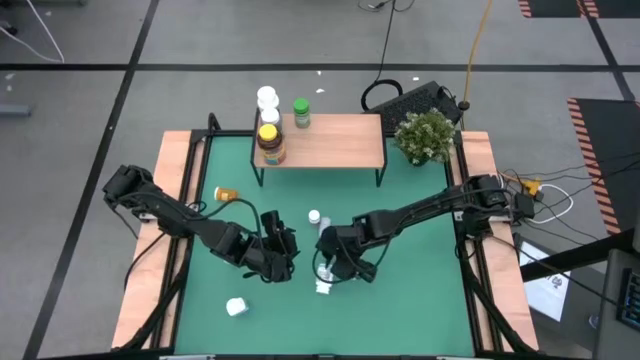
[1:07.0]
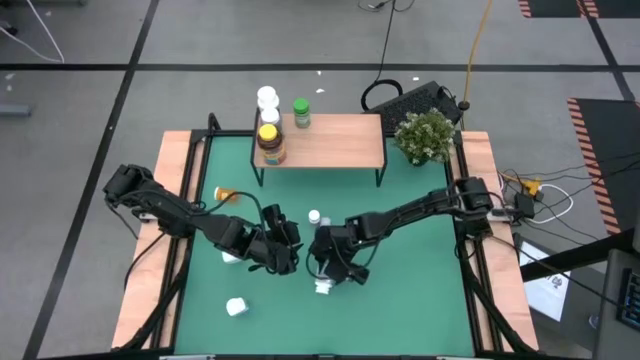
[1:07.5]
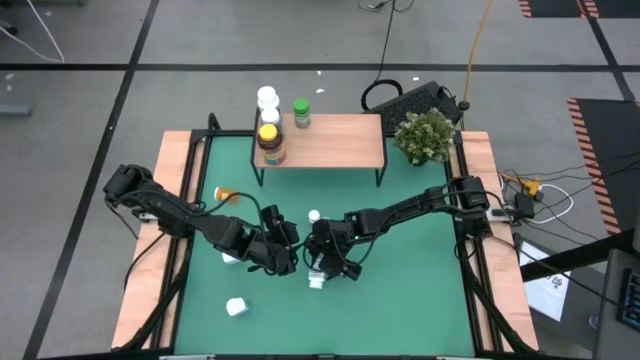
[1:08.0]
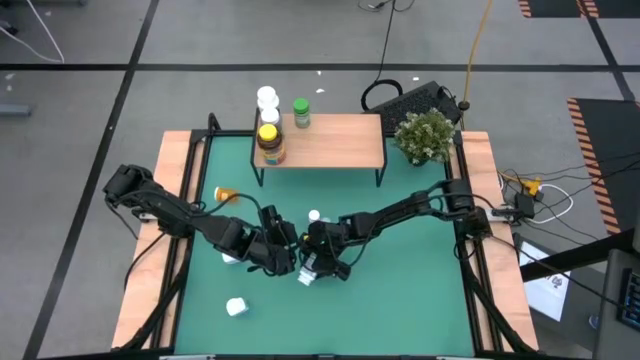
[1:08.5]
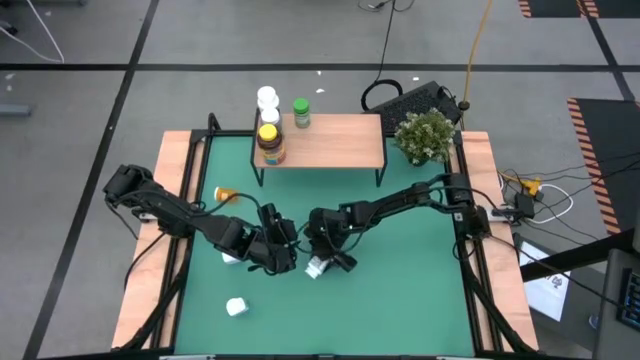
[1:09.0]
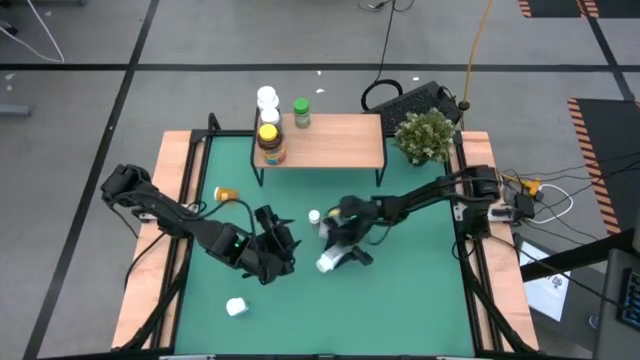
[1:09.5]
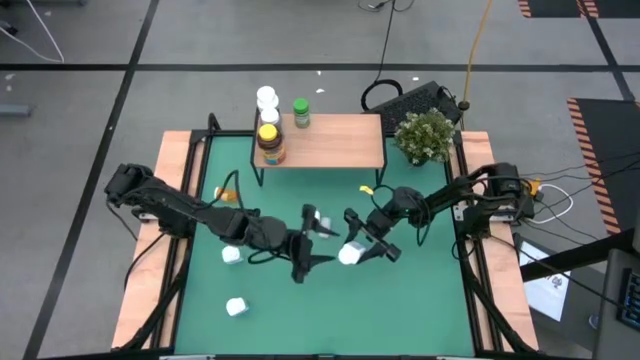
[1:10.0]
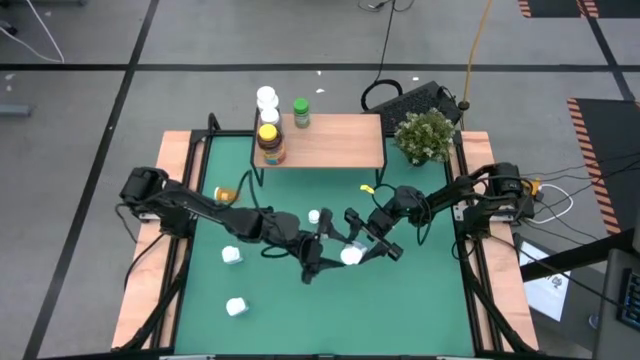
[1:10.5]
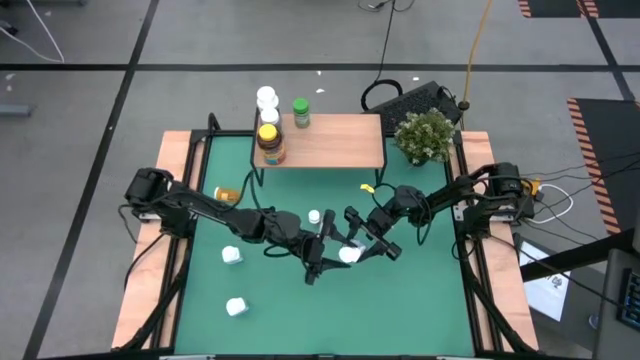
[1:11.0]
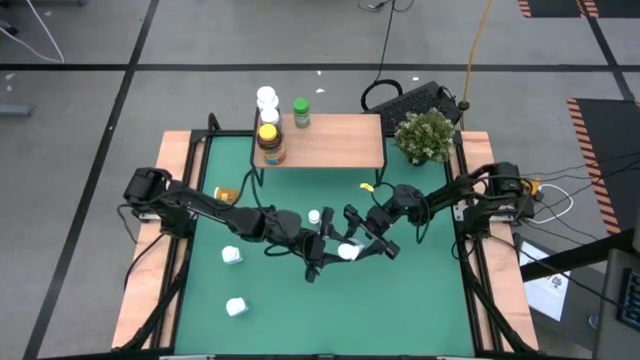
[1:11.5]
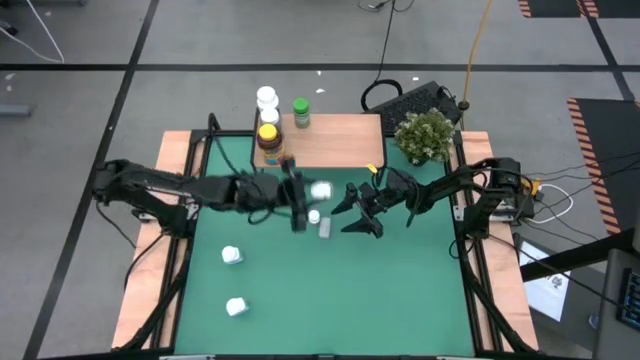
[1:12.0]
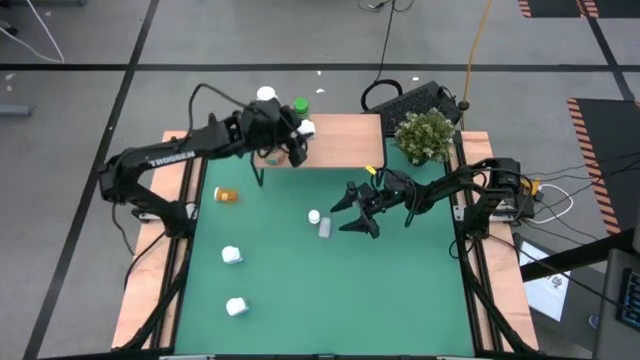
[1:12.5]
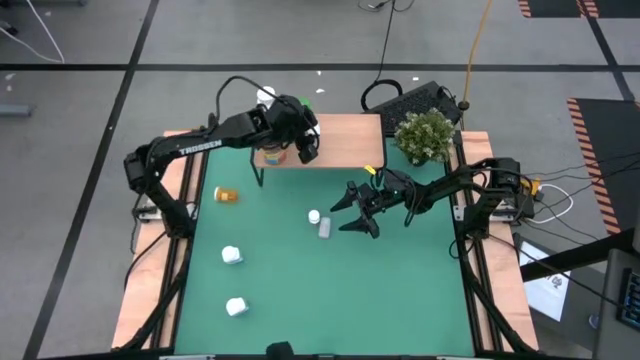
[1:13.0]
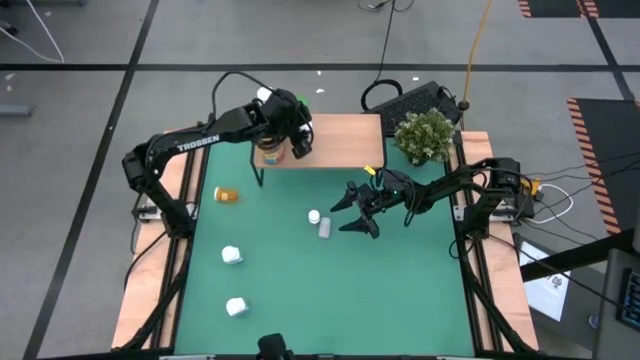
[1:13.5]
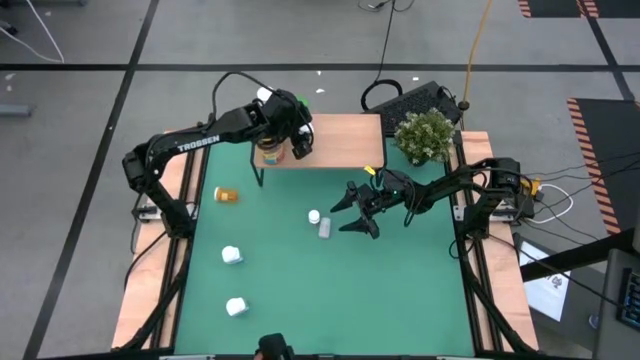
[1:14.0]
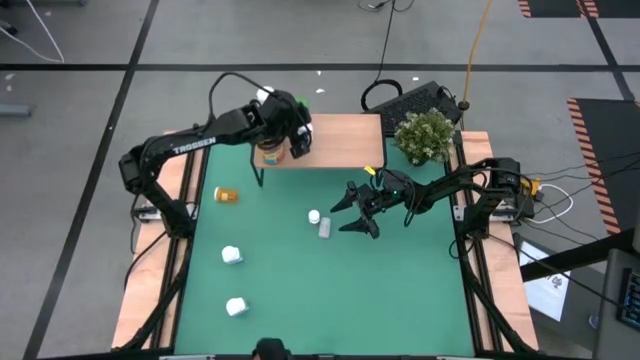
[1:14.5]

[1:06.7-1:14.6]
Task: Pick and place medicine bottles onto shelf by color
Put the right white and blue pill bottle on the shelf

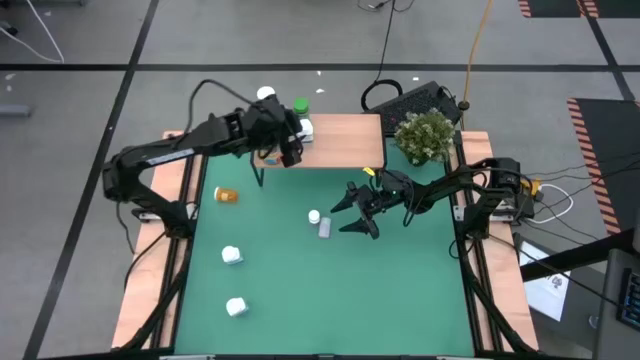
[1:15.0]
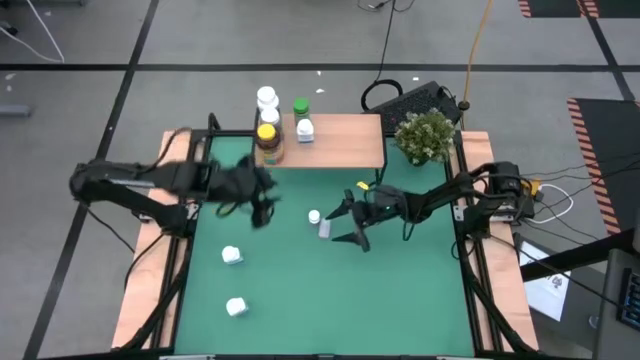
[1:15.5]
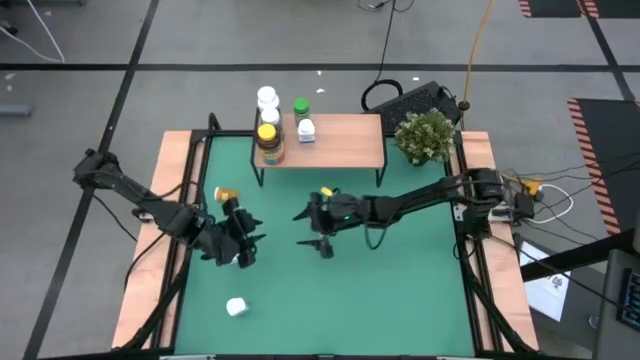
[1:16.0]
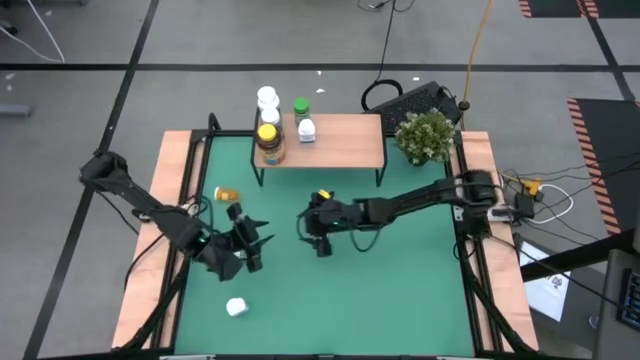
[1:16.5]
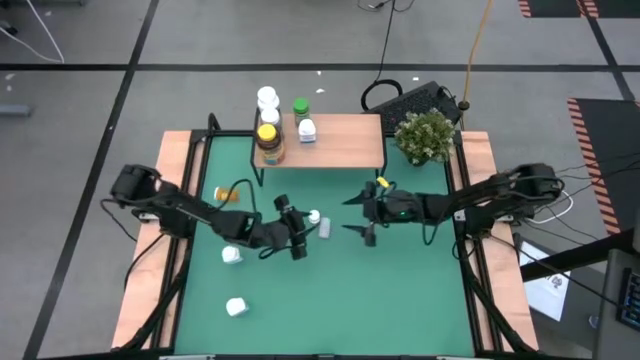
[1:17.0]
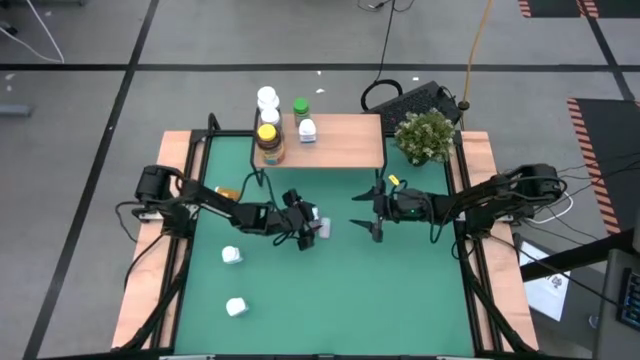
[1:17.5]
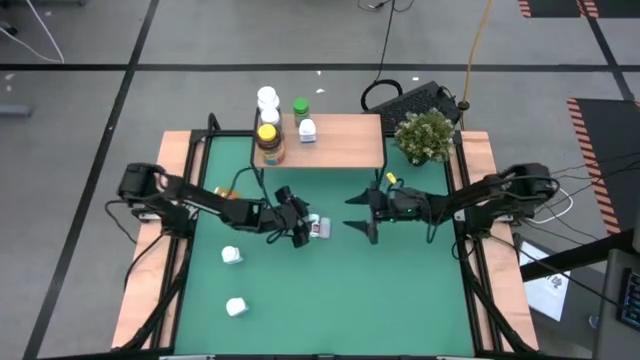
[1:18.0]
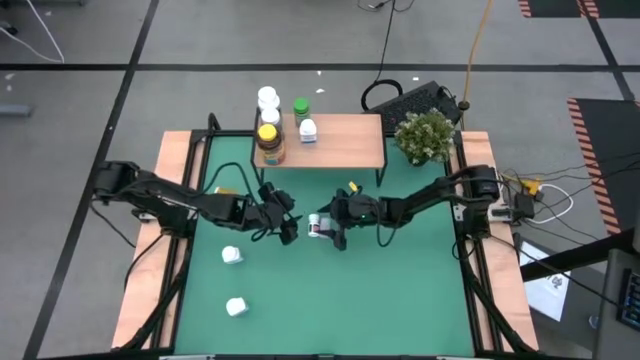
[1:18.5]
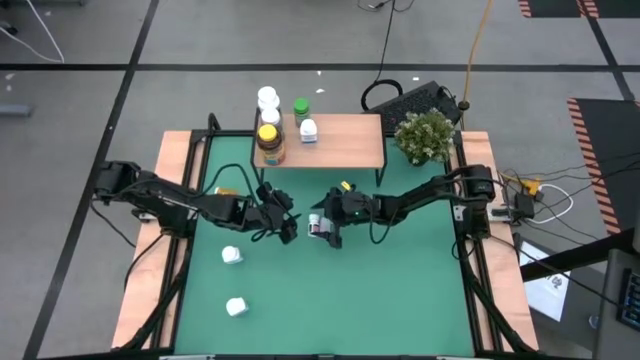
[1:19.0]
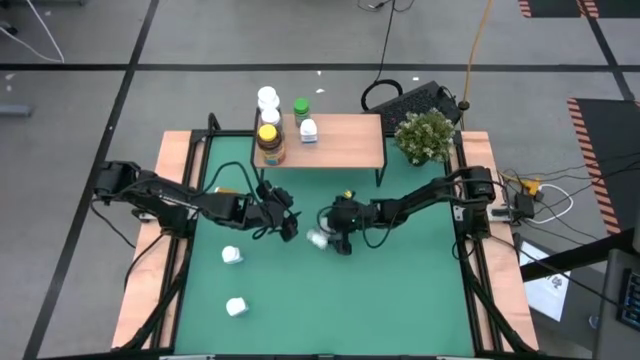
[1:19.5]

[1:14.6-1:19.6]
Put the white and black pill bottle on the shelf

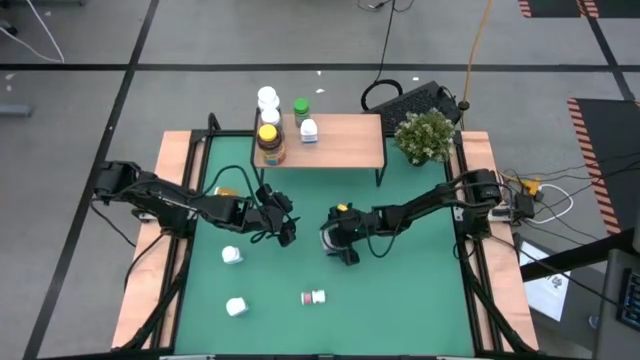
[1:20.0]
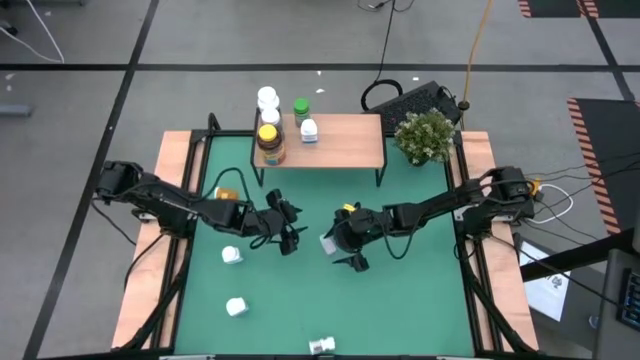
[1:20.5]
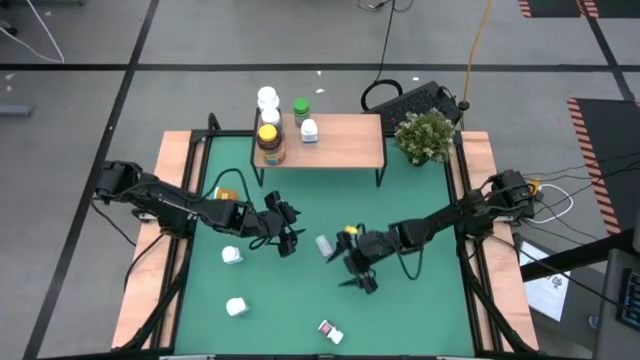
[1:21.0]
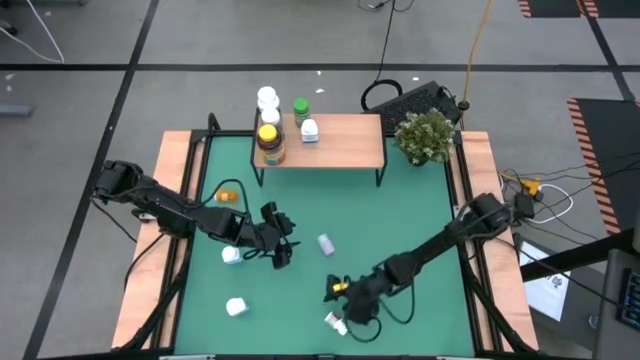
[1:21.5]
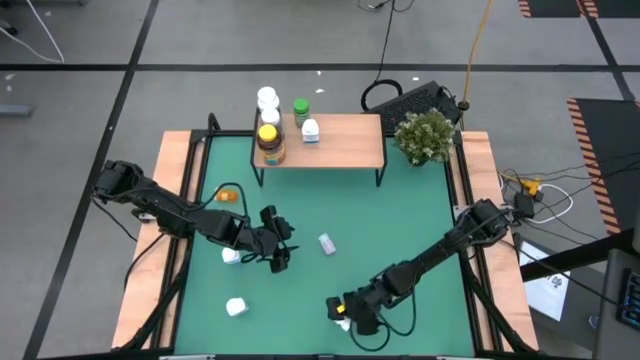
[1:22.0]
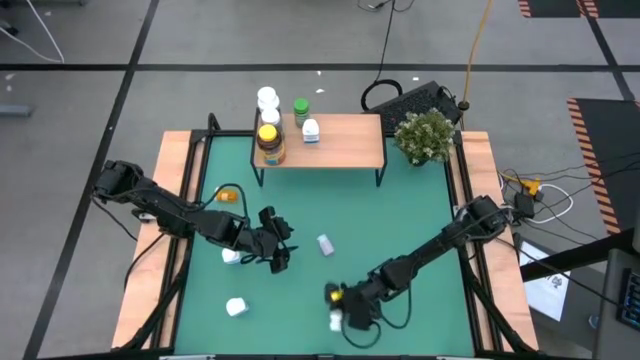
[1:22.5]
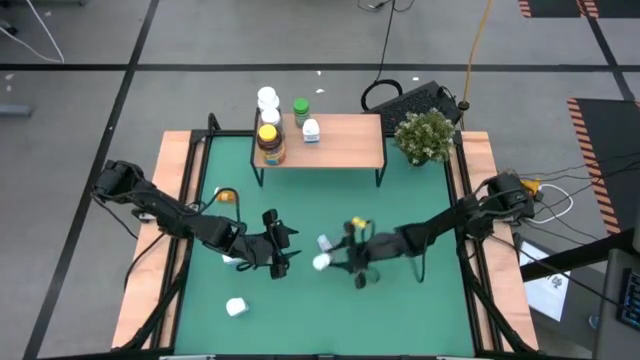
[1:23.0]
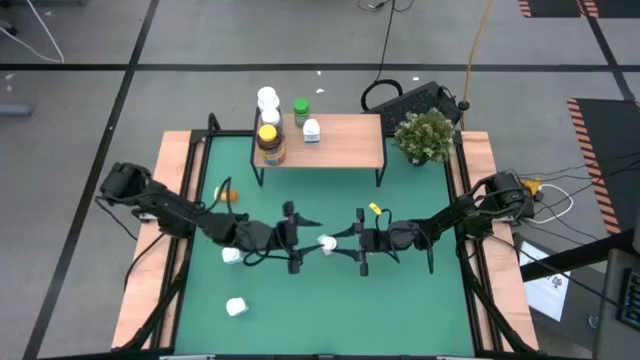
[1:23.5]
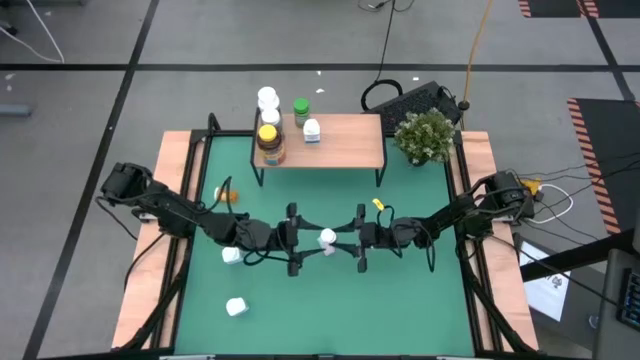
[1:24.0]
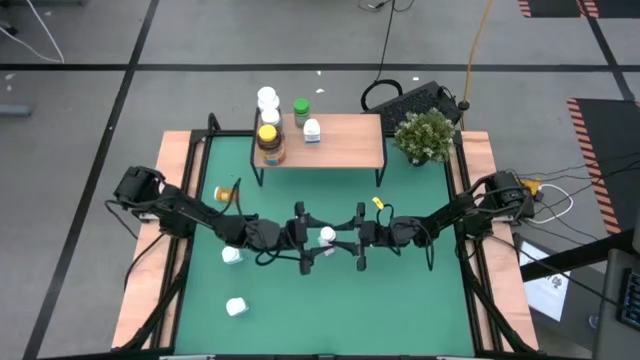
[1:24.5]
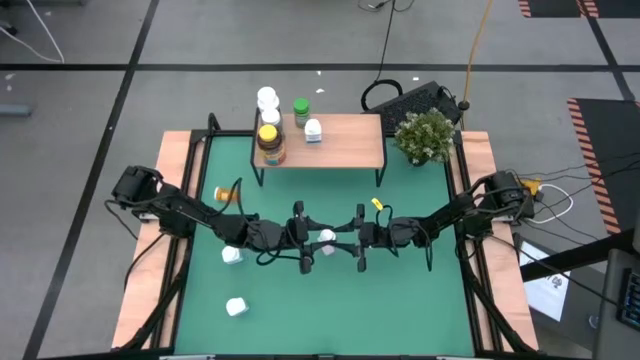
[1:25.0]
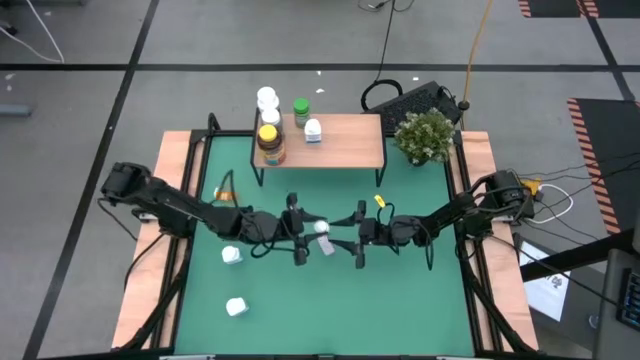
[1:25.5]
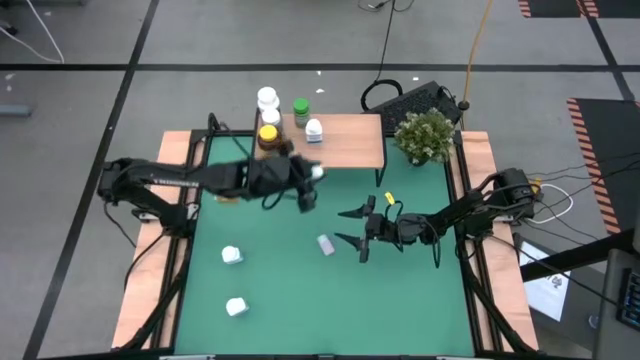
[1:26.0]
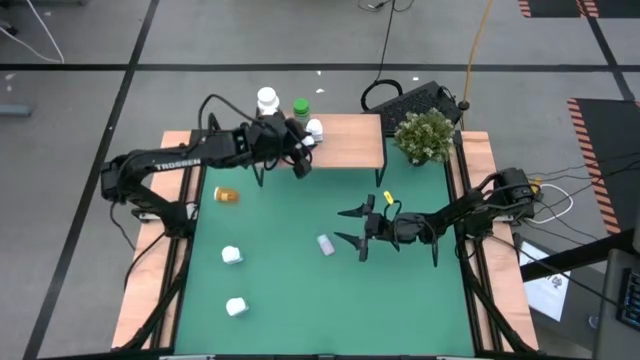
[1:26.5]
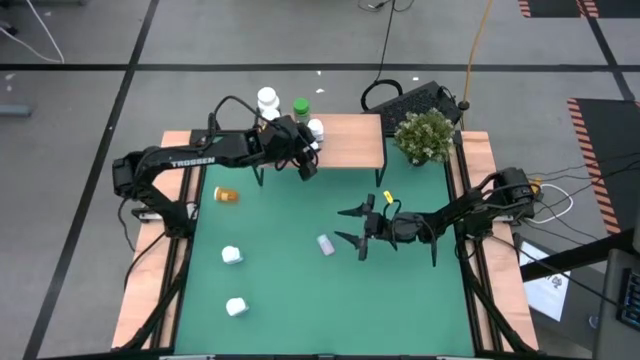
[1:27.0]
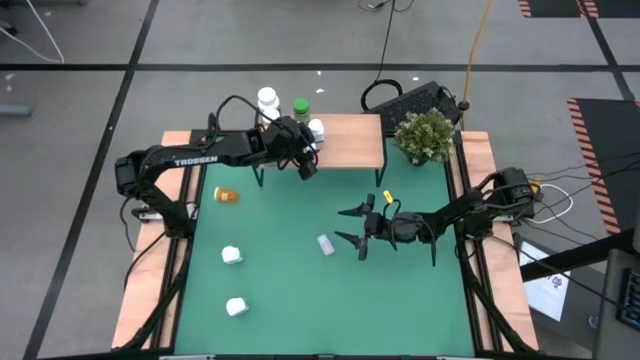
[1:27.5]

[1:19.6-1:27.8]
Put the white and black pill bottle on the shelf

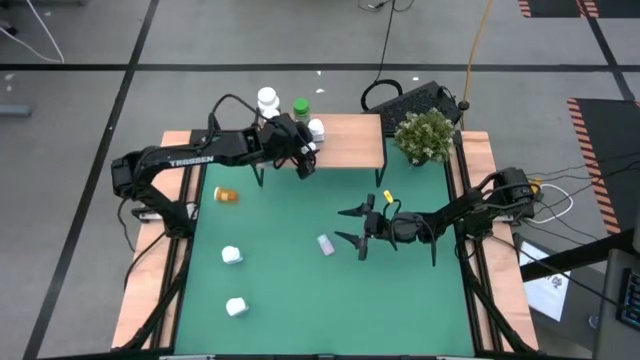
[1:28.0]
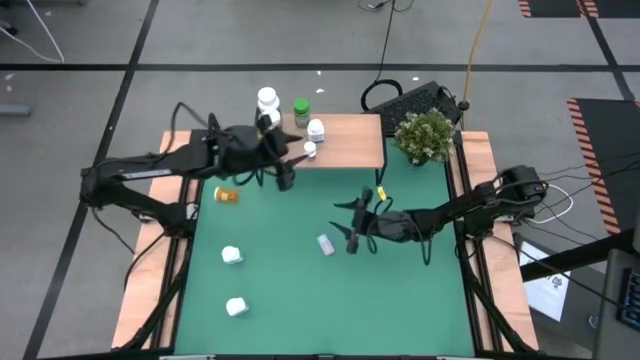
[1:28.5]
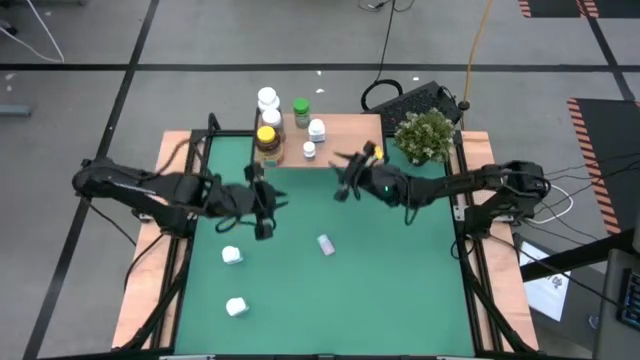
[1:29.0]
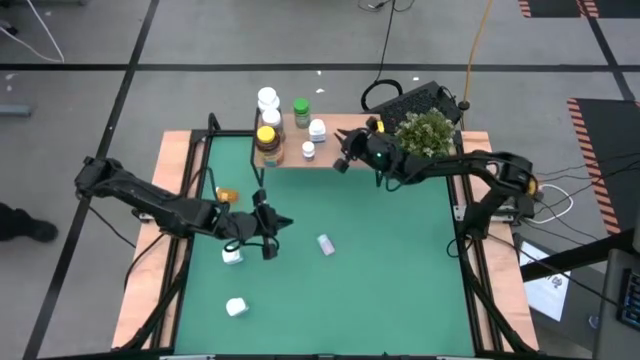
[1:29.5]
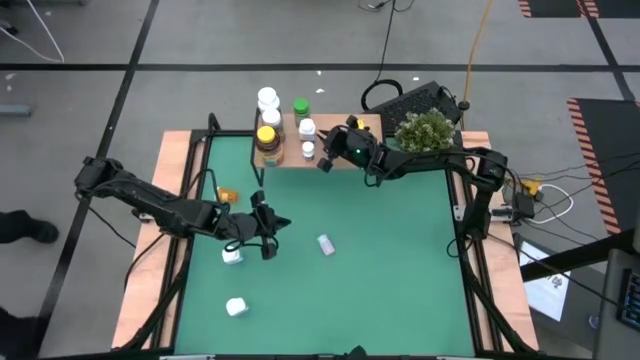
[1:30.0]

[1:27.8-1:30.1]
Adjust the white and blue pill bottle on the shelf
